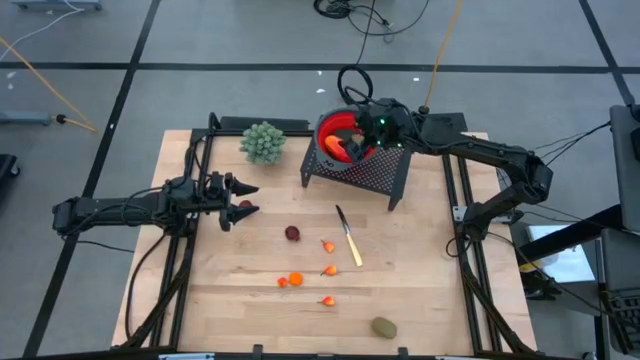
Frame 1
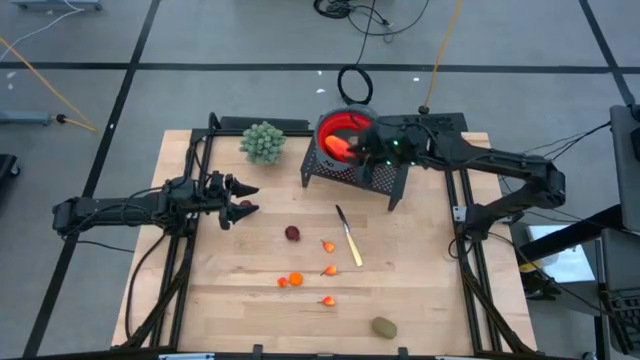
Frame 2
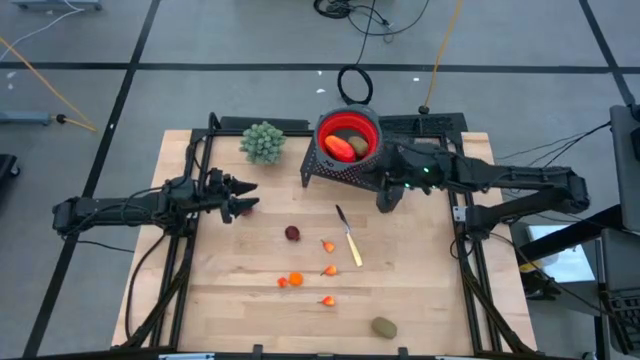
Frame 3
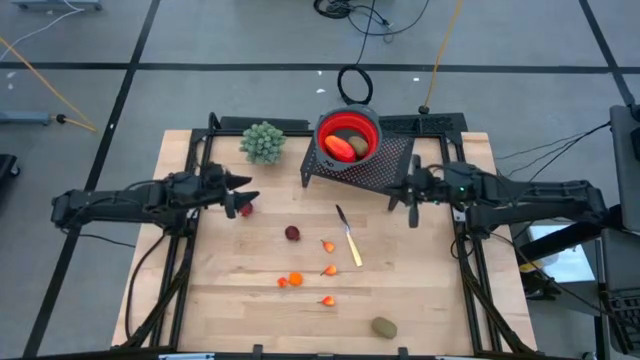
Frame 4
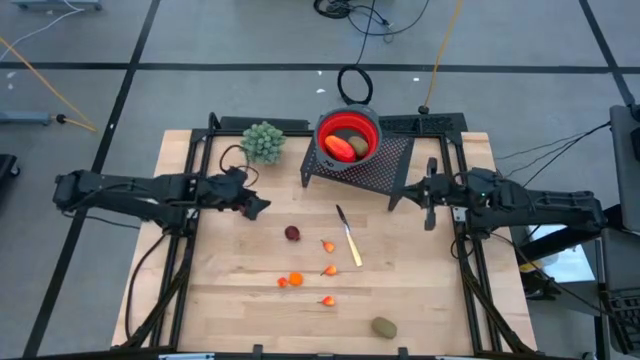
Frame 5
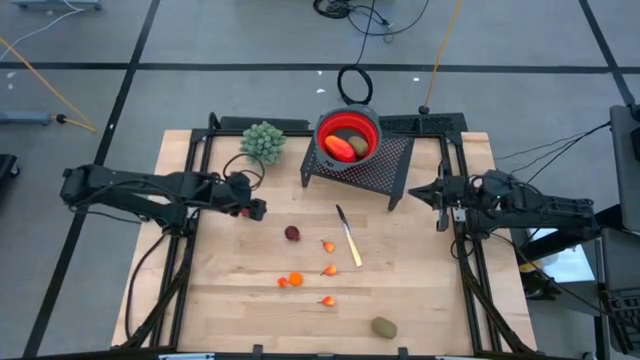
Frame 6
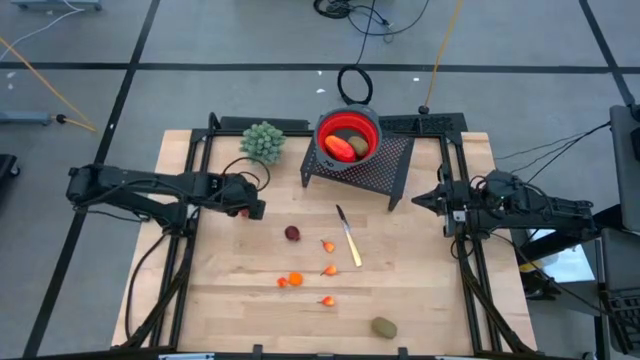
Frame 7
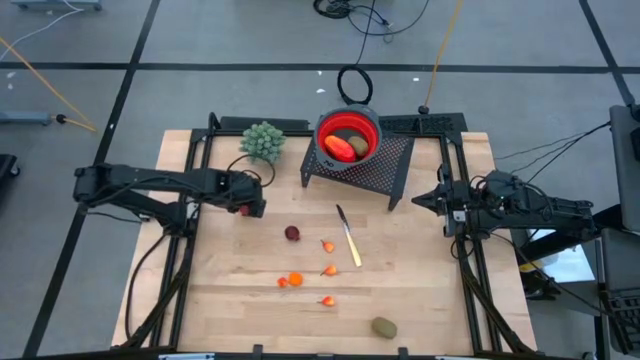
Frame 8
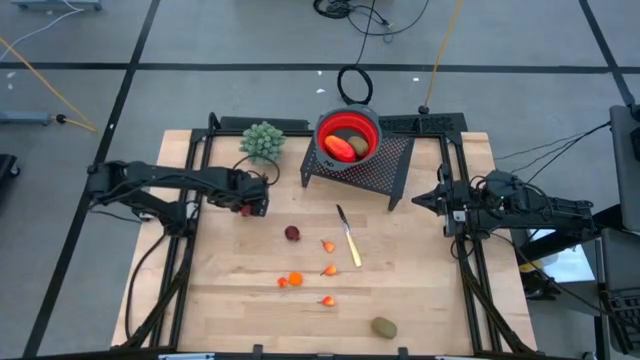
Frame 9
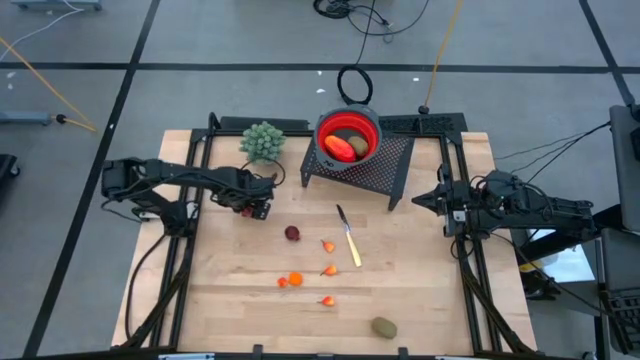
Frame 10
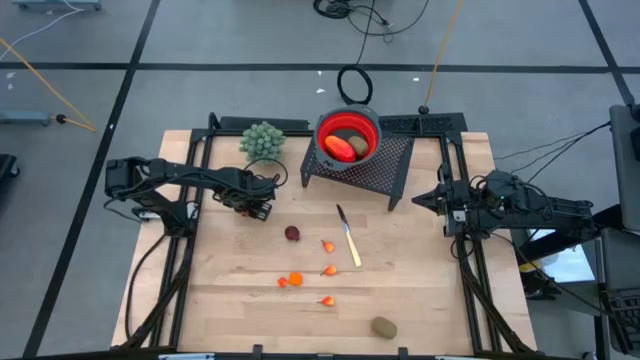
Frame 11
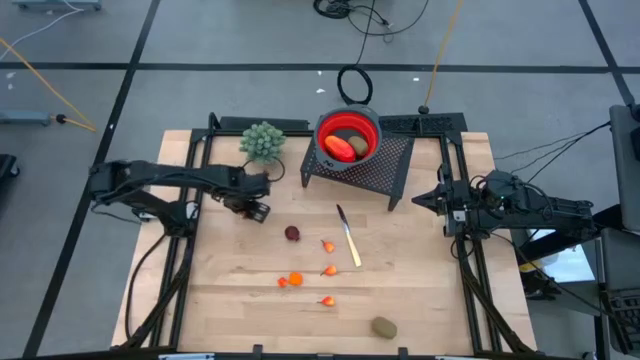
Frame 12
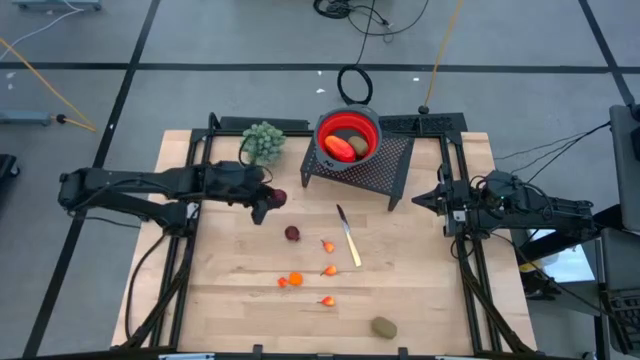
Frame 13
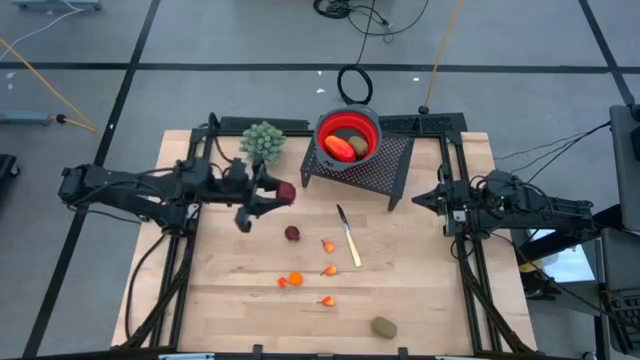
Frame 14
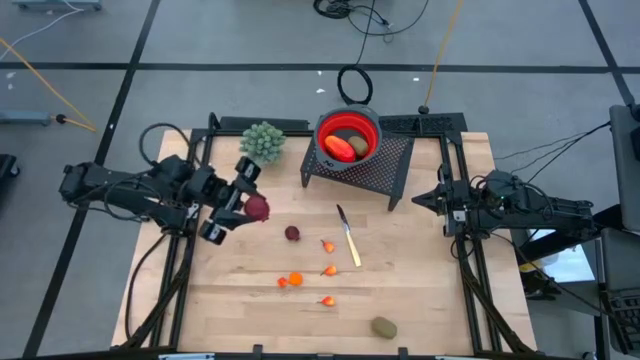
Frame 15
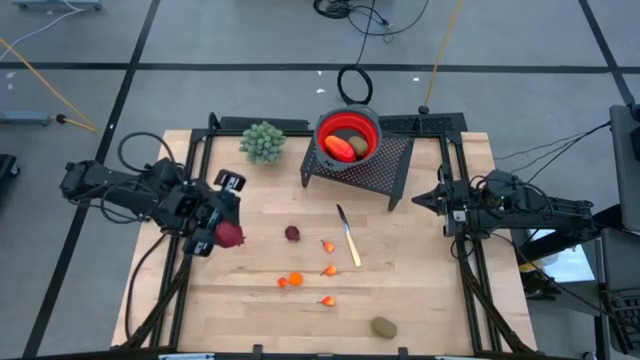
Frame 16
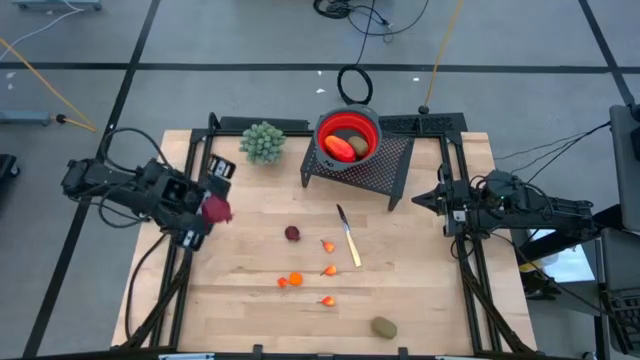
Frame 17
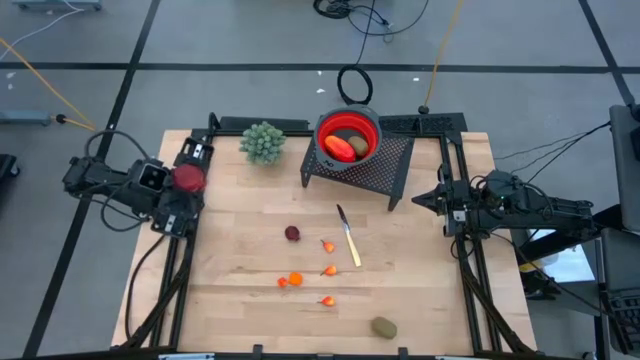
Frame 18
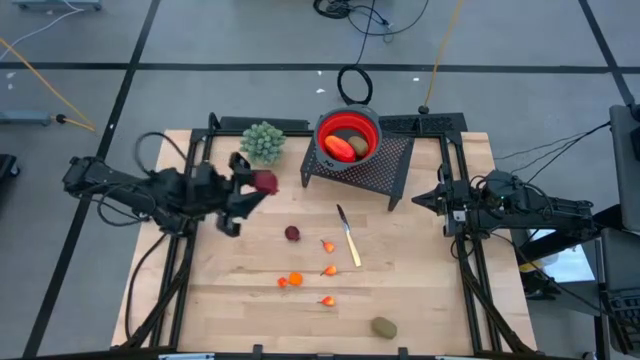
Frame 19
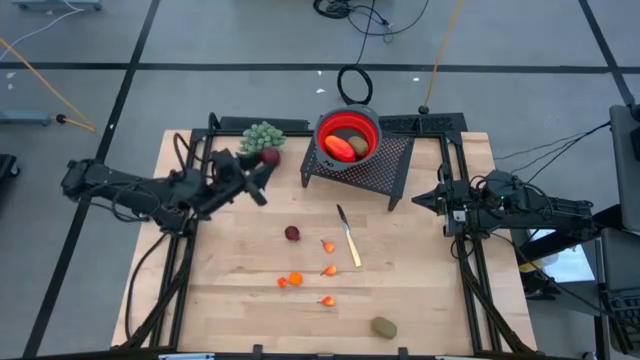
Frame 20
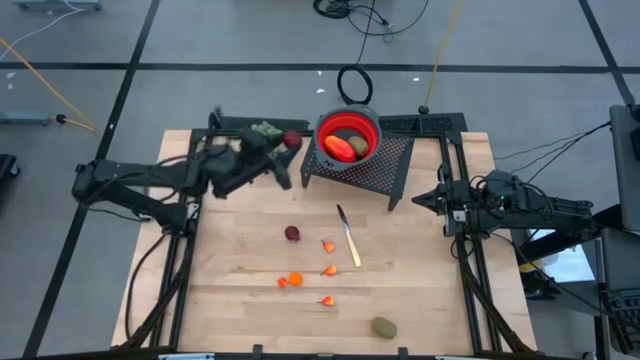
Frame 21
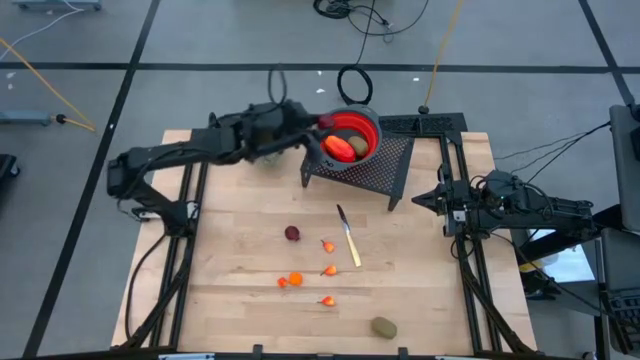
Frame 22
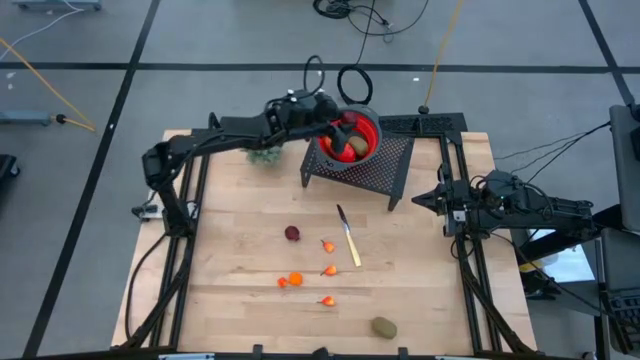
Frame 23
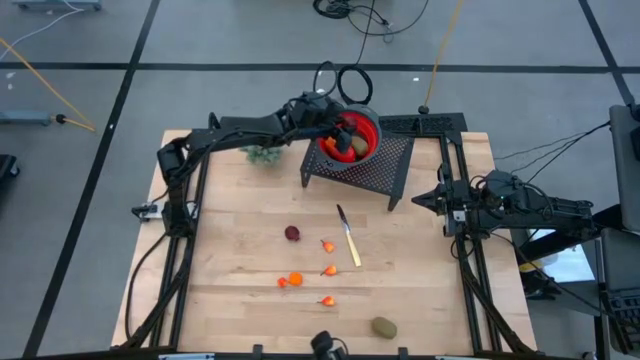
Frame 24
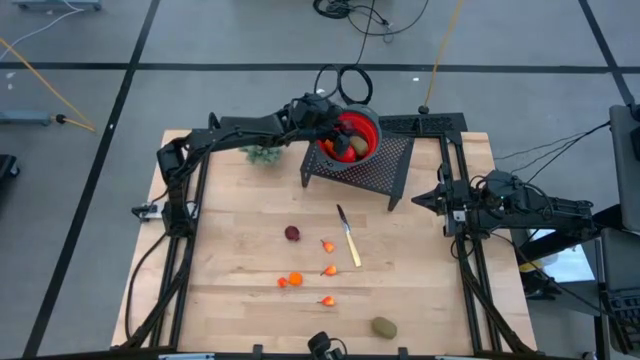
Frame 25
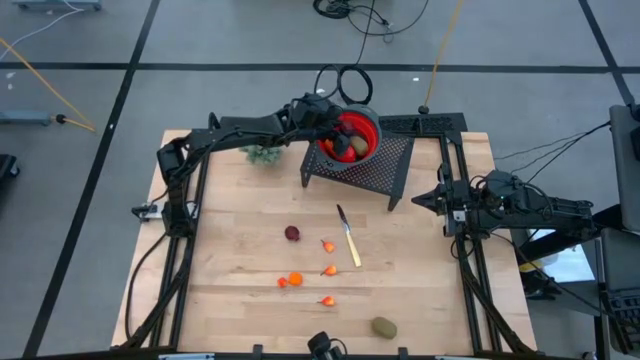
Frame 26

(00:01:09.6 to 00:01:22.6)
Task: Pick & Place Fruit
Put the red pomegranate into the red strainer bowl on the shelf

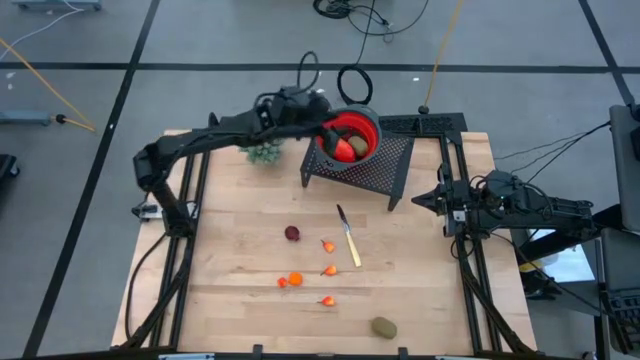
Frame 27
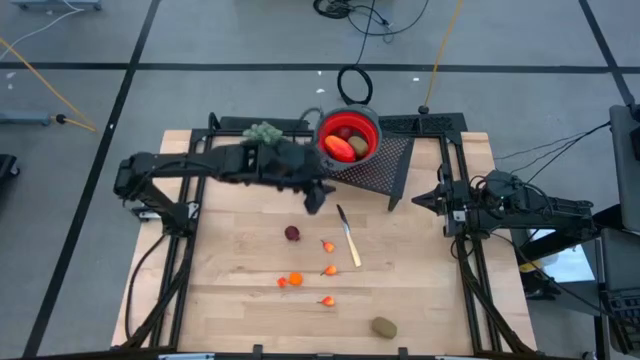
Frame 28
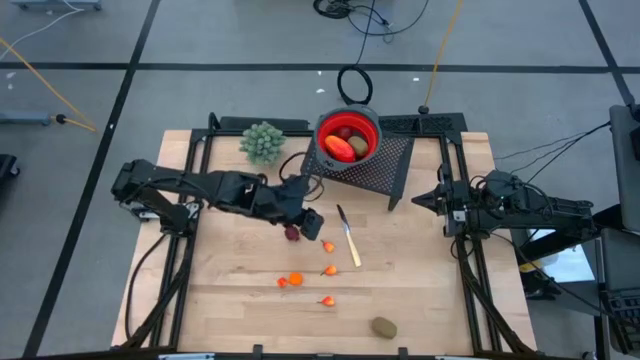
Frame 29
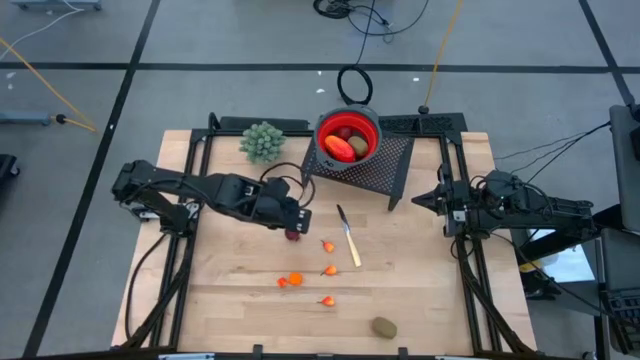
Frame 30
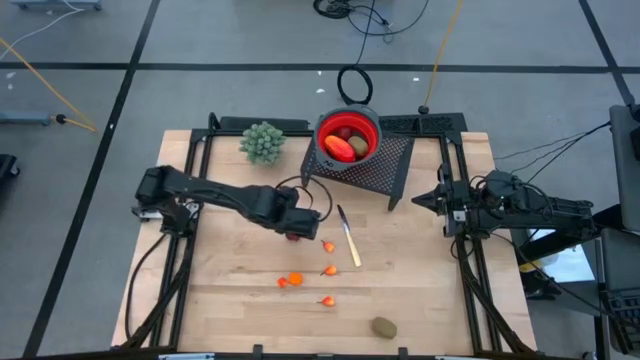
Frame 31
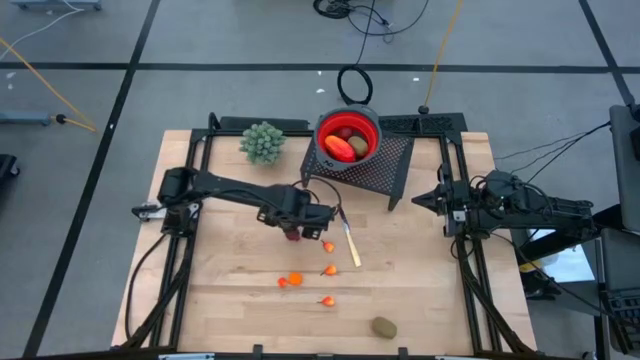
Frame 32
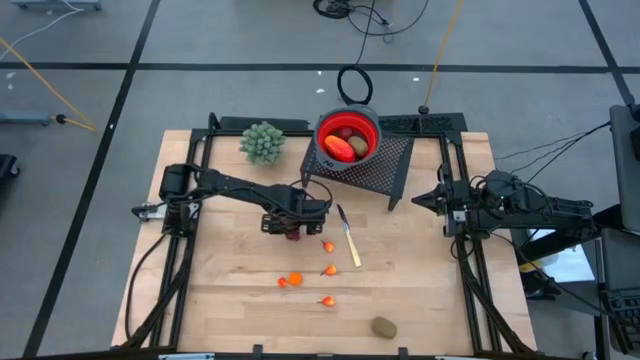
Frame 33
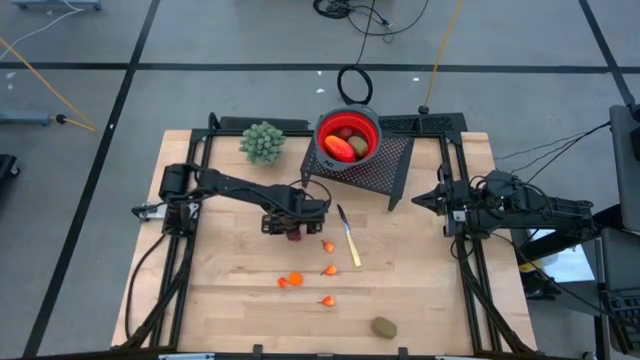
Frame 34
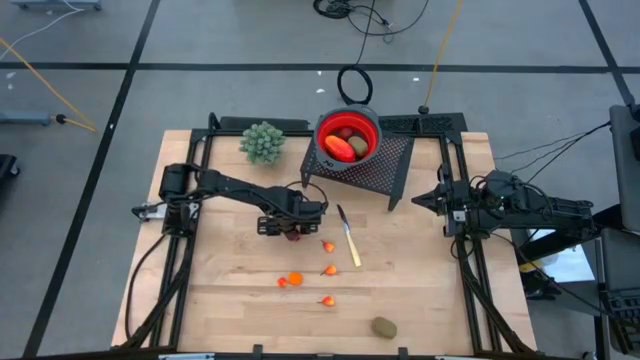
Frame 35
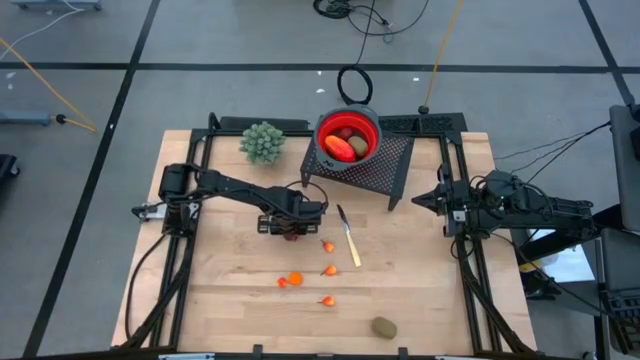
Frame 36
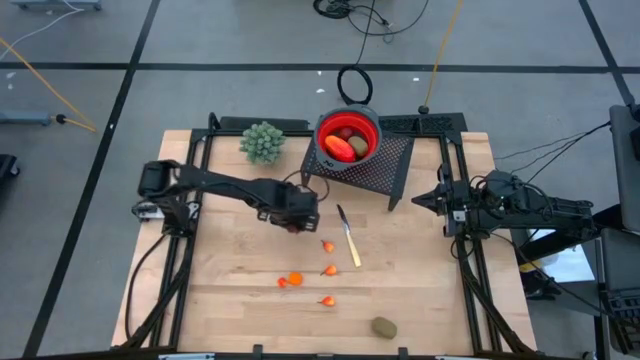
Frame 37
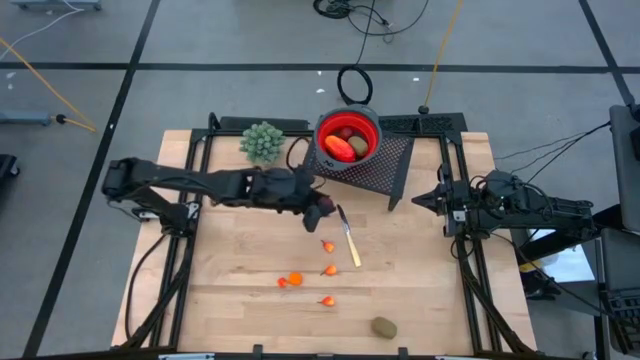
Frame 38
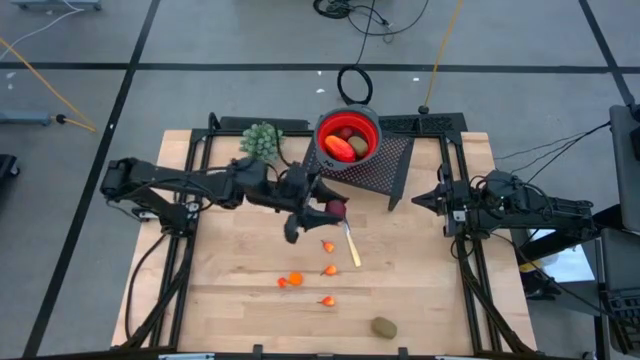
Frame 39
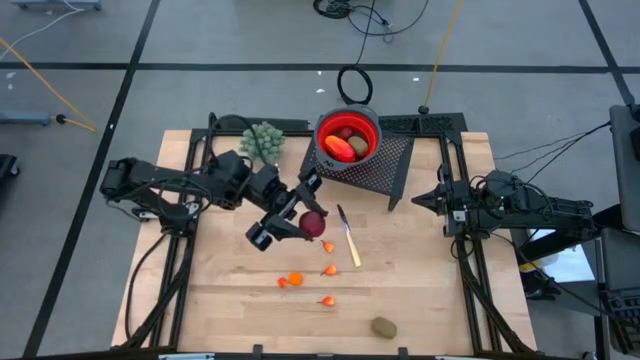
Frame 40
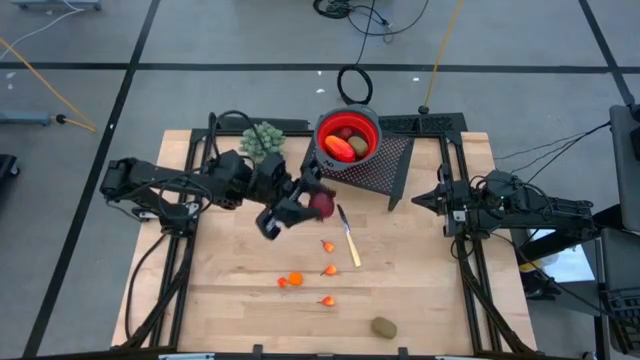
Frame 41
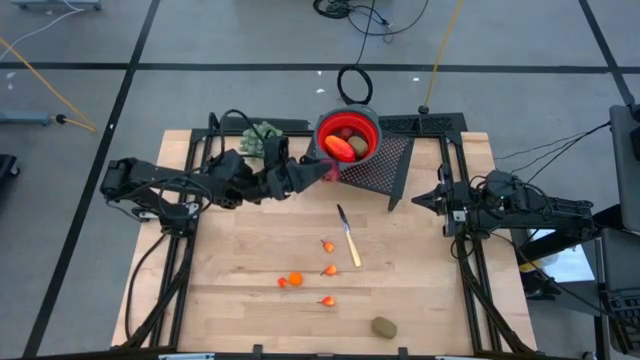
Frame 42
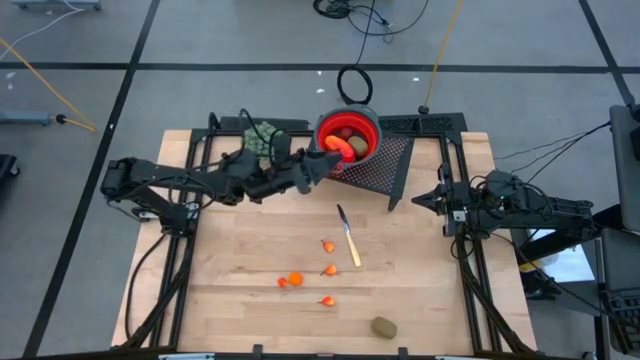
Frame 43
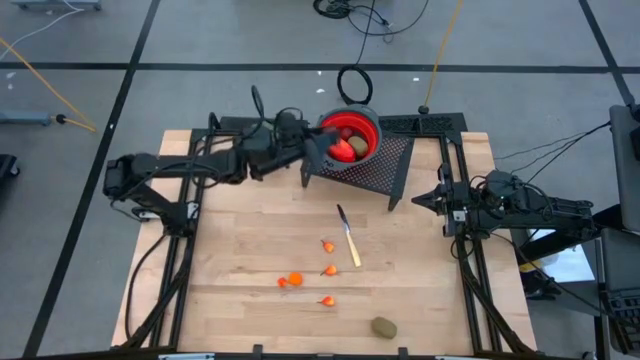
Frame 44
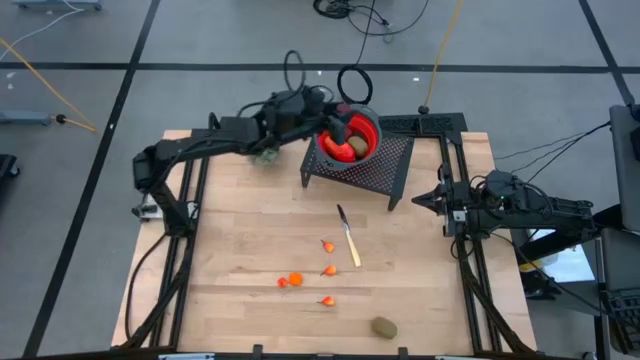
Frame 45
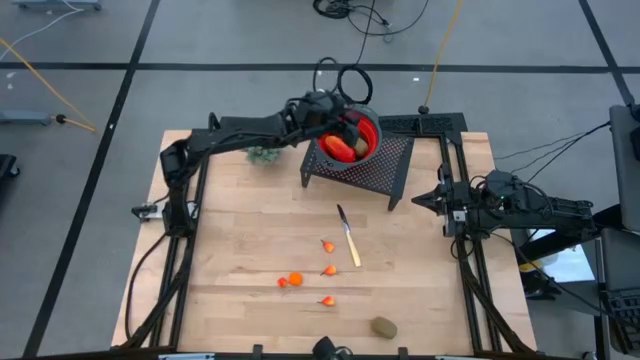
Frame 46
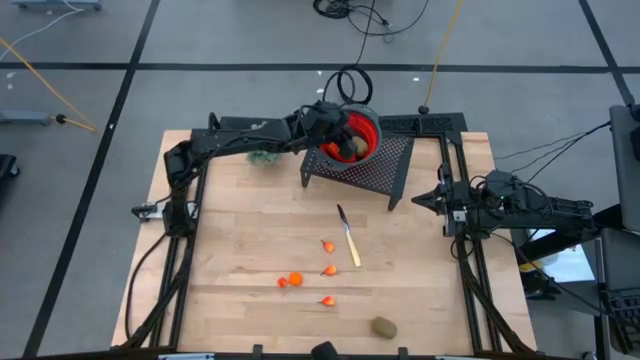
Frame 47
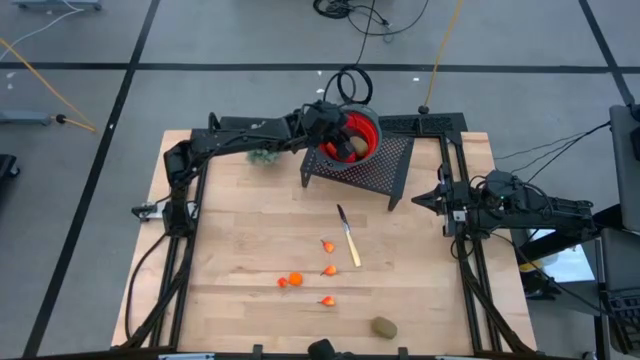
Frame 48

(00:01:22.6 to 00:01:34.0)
Put the red pomegranate into the red strainer bowl on the shelf
